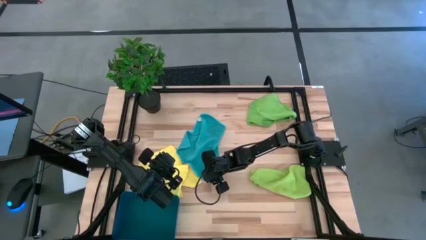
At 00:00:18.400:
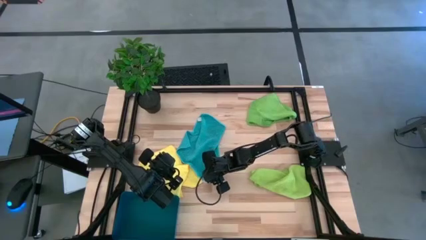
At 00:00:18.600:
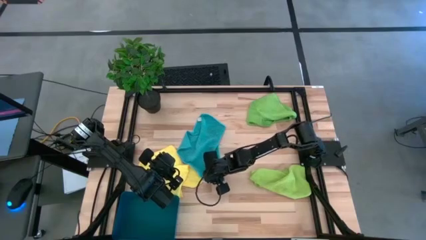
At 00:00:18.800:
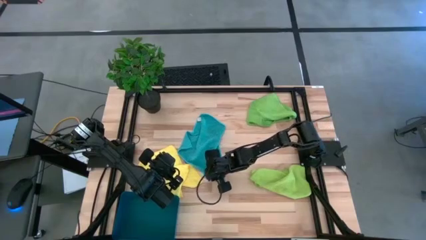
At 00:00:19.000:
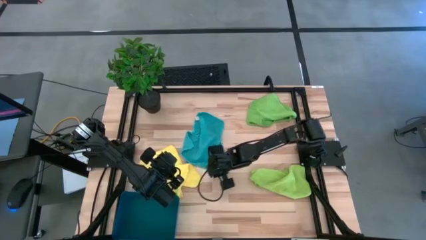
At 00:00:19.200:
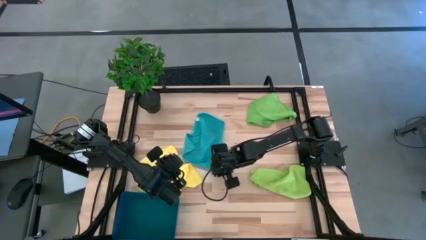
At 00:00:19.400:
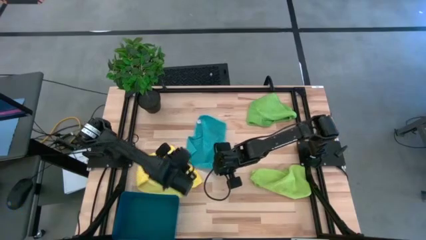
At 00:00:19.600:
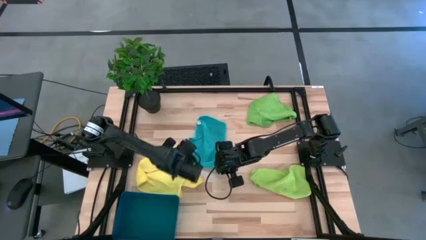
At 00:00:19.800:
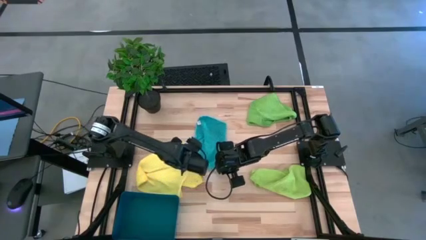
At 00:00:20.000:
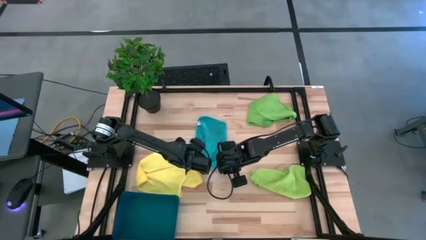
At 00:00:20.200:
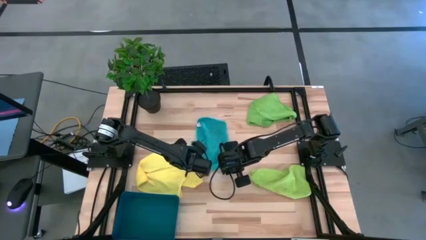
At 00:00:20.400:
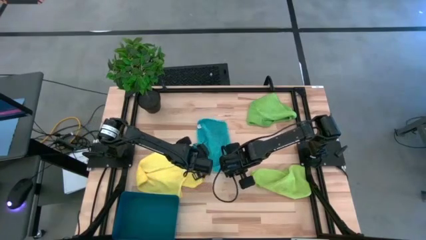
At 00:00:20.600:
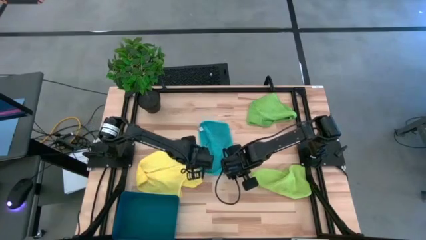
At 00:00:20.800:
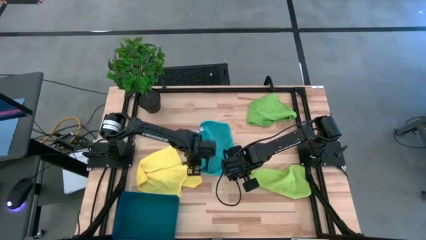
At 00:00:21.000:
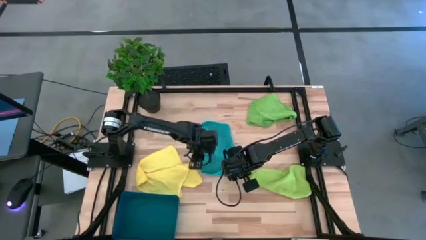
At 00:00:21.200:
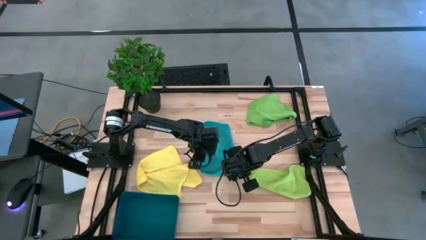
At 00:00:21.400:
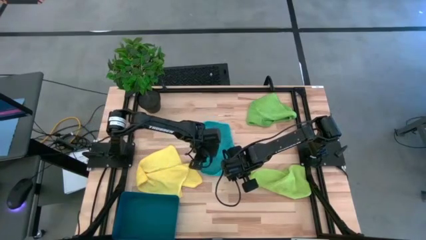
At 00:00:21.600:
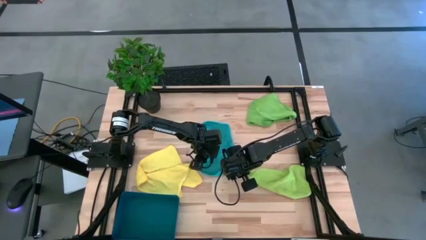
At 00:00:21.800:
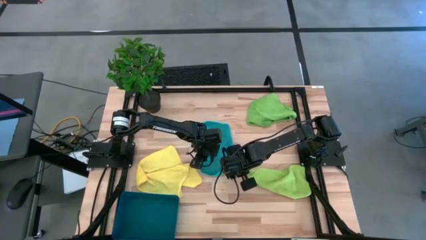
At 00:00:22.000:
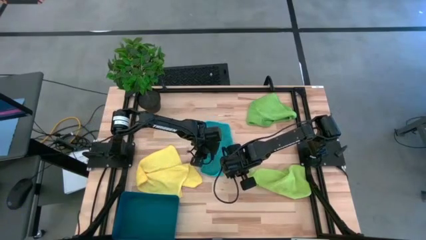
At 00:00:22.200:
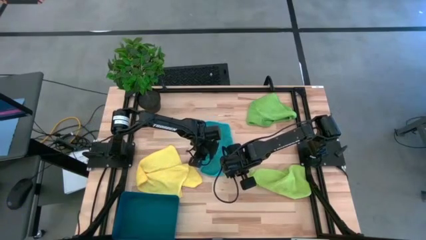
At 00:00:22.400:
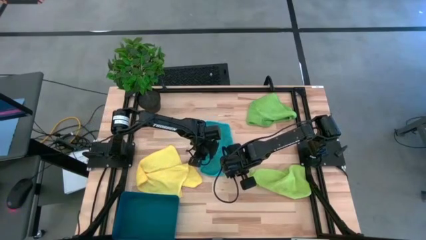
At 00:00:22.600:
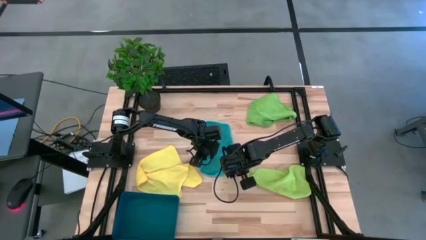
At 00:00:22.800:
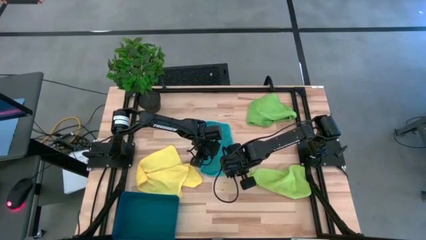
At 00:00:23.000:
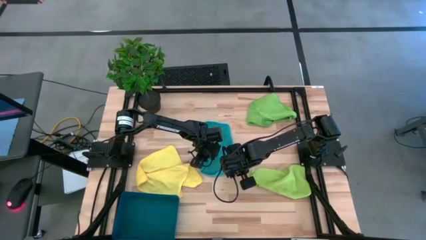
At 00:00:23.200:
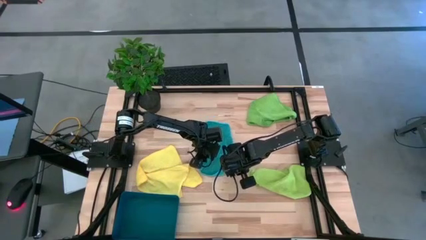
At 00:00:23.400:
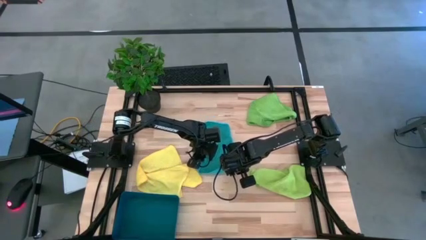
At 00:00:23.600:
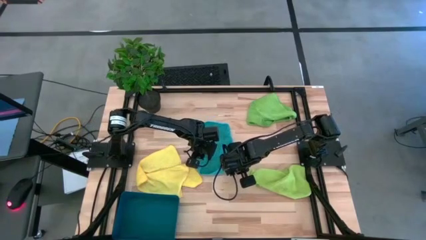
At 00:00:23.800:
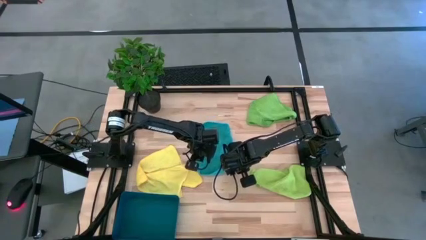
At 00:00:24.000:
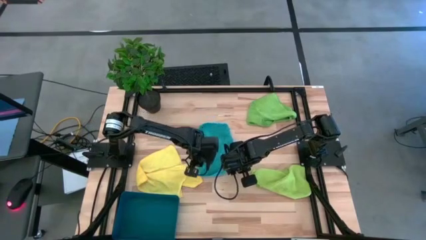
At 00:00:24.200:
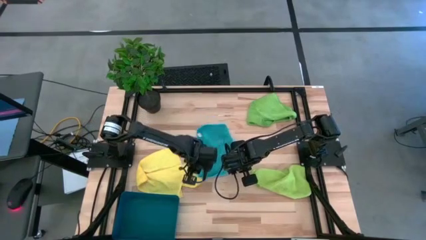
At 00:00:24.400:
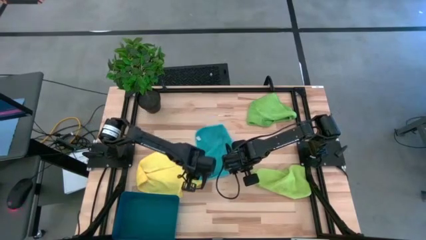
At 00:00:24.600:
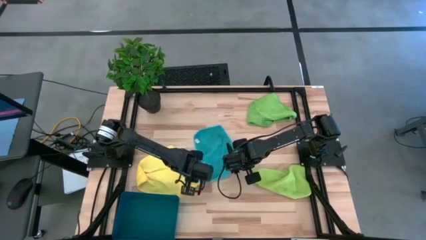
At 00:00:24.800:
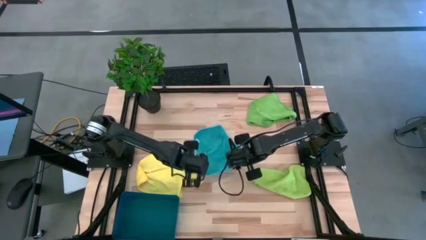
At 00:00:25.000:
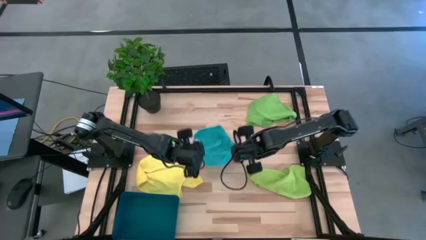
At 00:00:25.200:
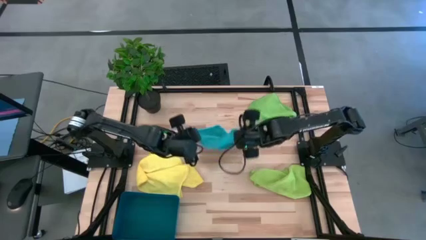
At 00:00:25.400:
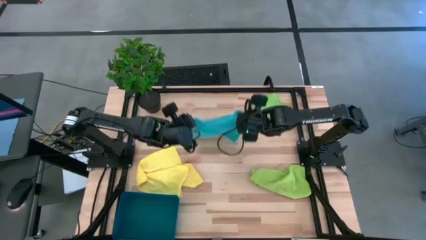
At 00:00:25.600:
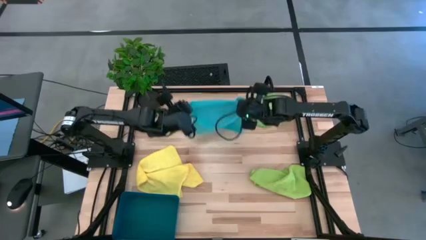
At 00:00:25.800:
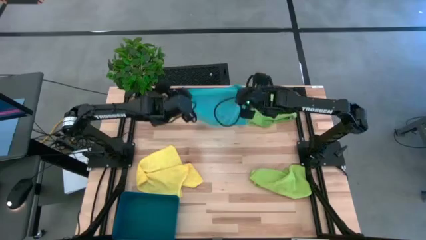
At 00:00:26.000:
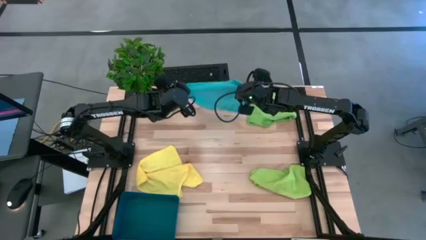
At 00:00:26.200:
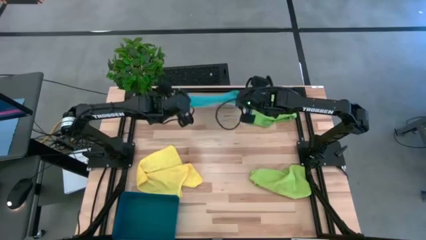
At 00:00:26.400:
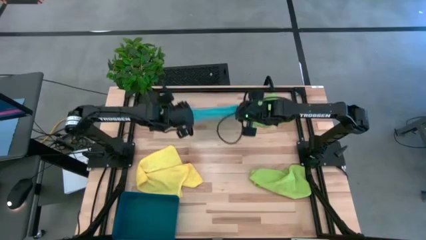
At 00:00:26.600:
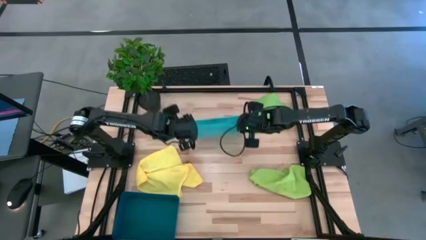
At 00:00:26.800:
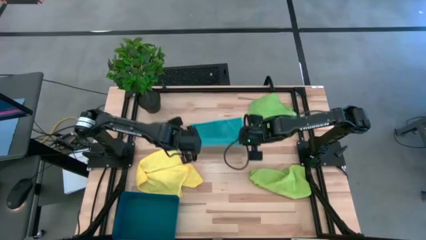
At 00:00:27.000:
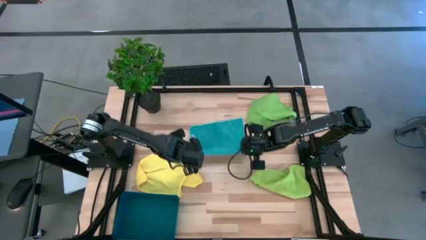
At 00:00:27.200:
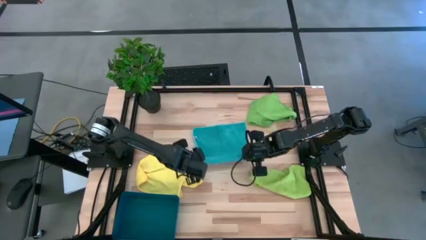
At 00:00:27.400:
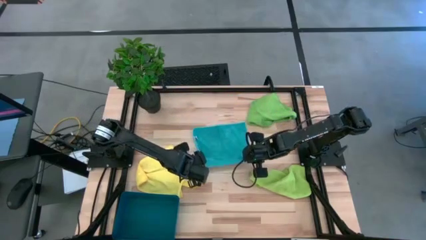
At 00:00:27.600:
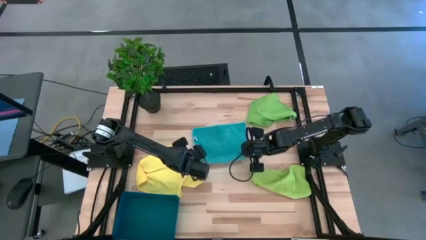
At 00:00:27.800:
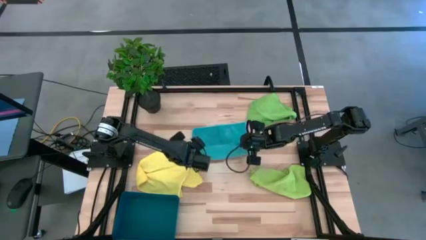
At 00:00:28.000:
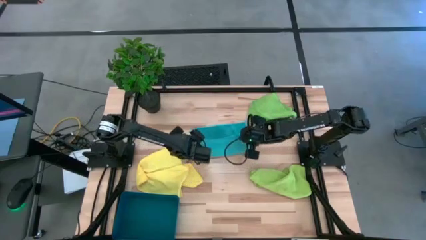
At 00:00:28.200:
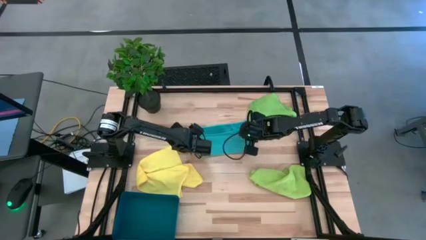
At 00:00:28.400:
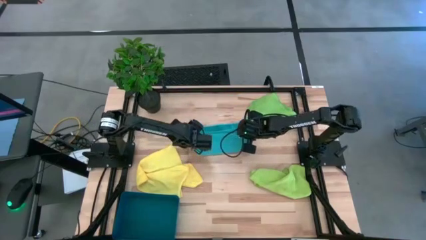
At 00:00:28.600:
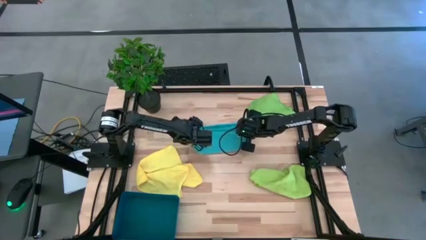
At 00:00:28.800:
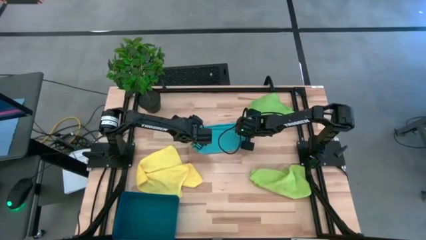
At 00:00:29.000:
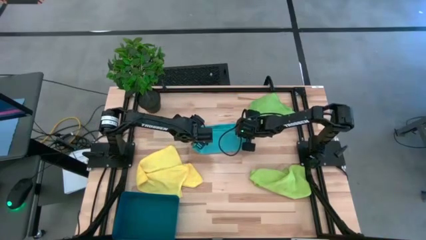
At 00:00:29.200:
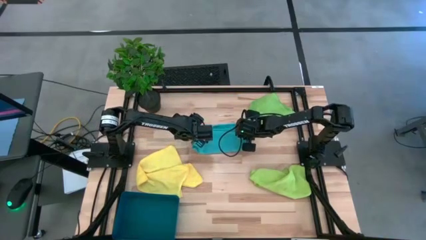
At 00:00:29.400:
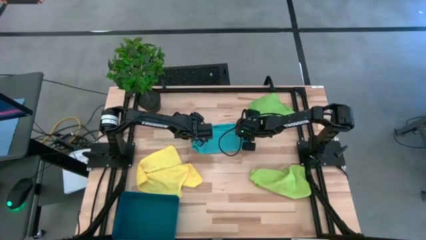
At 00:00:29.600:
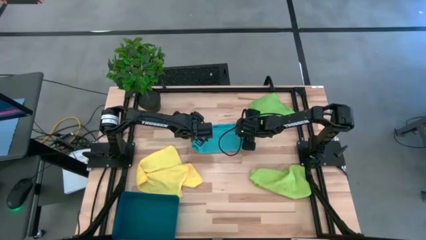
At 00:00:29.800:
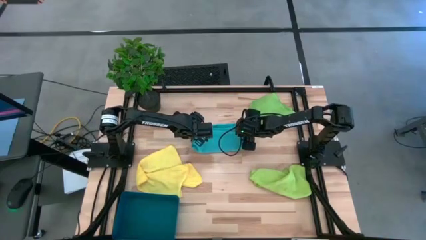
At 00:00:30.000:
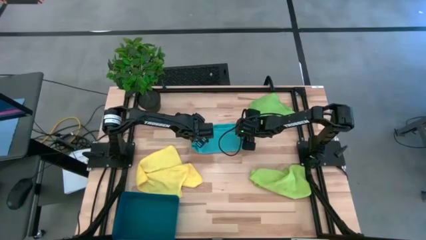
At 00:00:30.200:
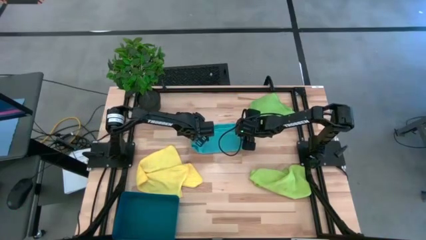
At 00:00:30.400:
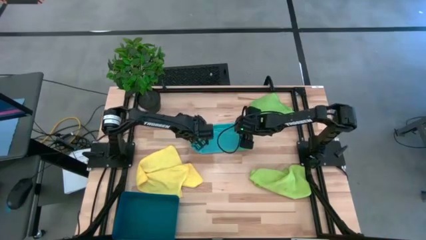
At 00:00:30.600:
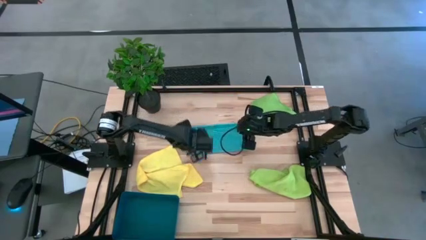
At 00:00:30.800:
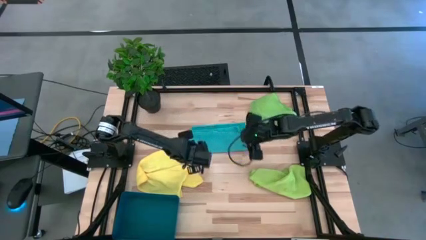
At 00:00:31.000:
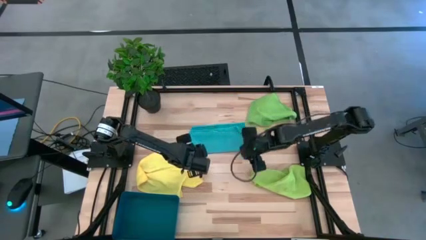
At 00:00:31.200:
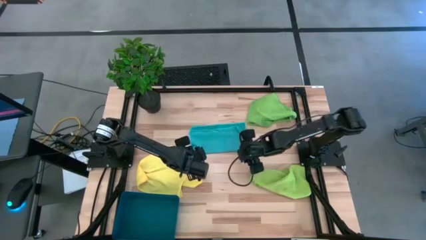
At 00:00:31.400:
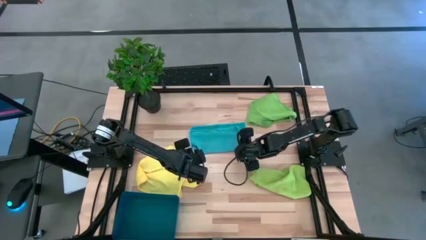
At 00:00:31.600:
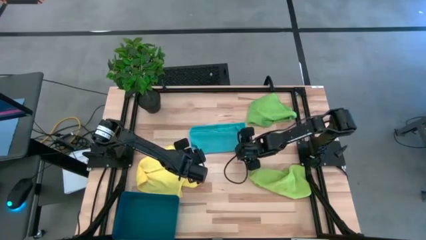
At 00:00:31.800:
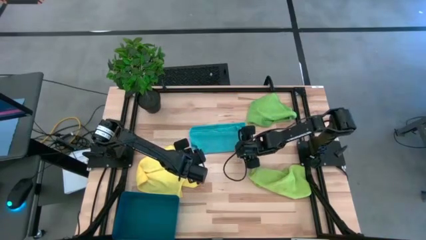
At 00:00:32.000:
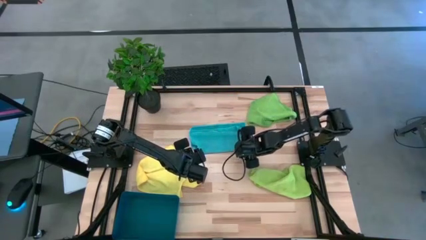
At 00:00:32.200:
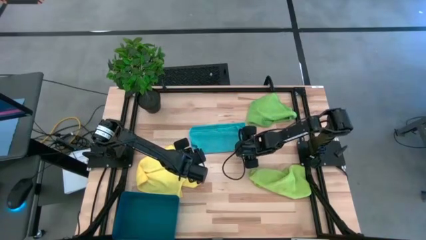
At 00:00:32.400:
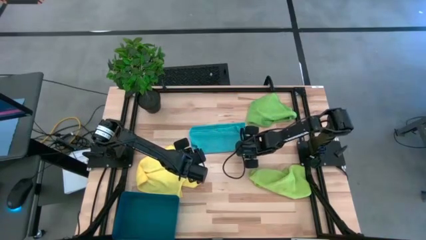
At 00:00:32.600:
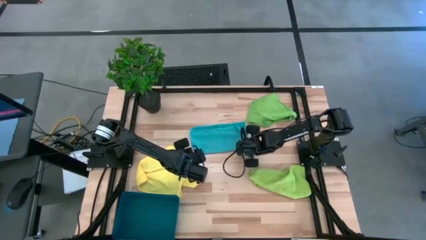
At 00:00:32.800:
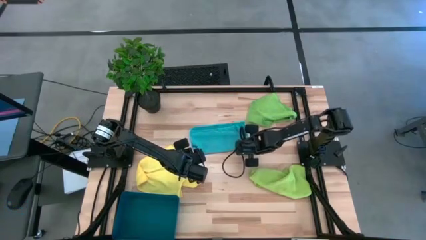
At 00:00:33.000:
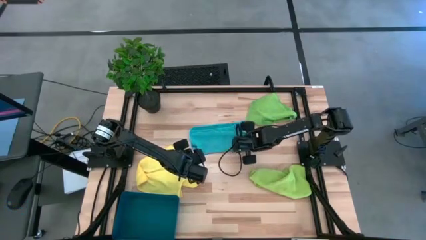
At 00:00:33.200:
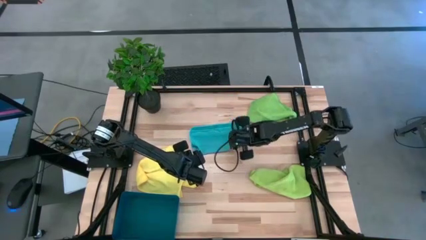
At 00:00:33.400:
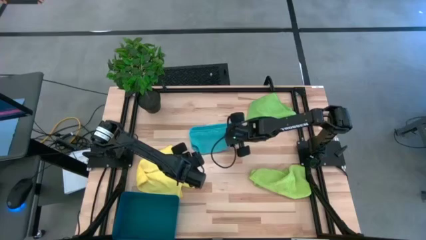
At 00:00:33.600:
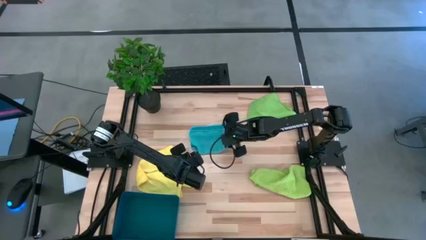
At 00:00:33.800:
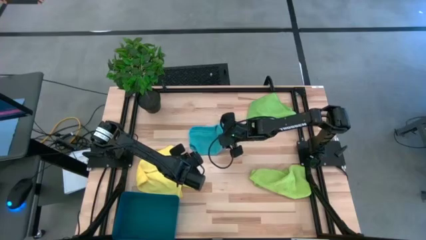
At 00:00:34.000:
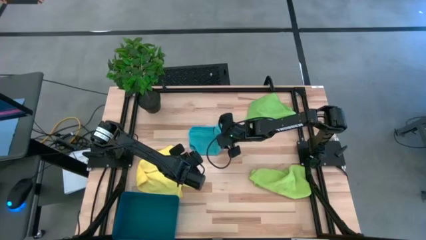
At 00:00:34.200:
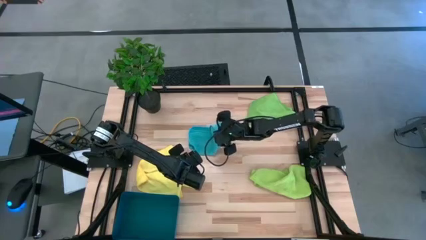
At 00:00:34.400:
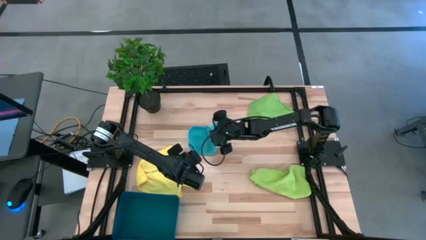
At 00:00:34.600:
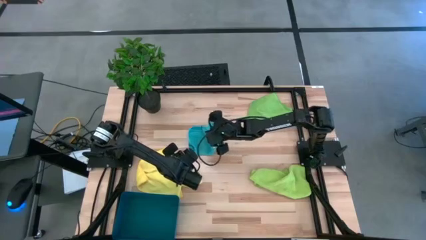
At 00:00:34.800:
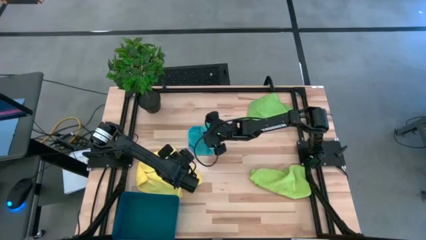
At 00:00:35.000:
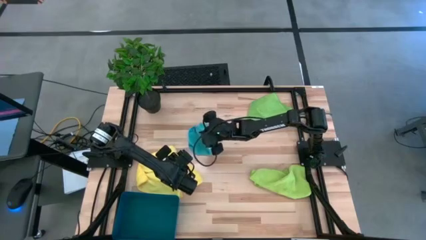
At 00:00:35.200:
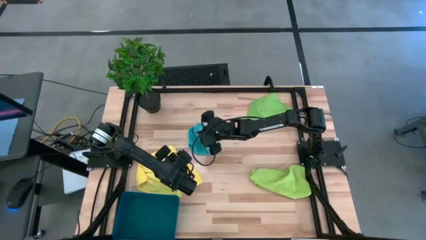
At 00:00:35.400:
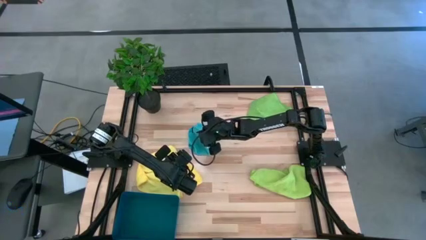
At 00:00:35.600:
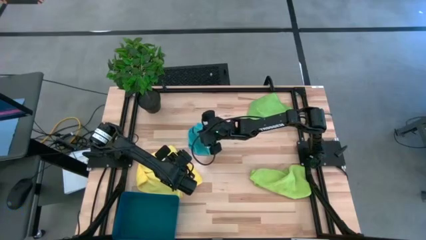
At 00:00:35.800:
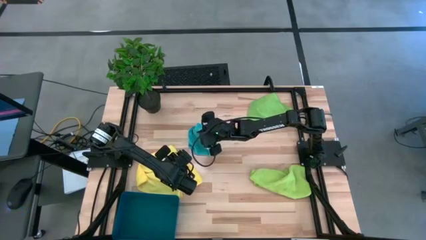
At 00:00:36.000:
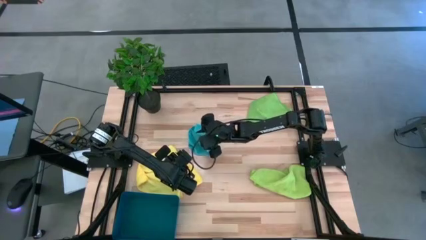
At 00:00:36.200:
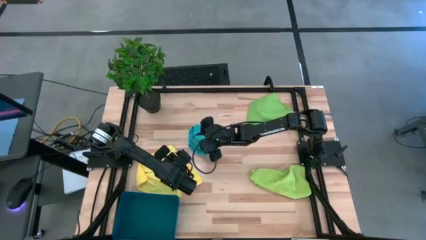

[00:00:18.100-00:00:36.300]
Task: Fold microfiber towels
Fold the blue microfiber towel
